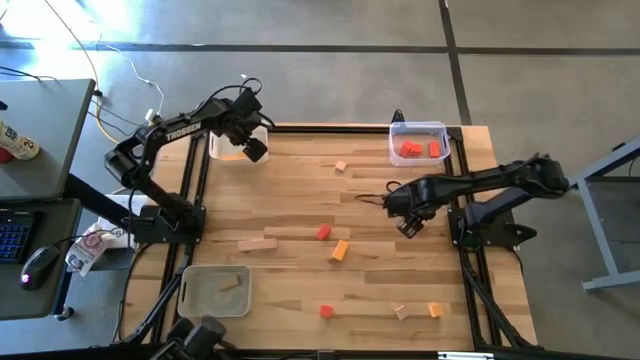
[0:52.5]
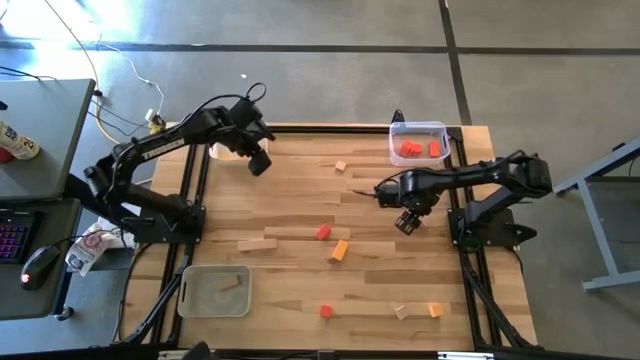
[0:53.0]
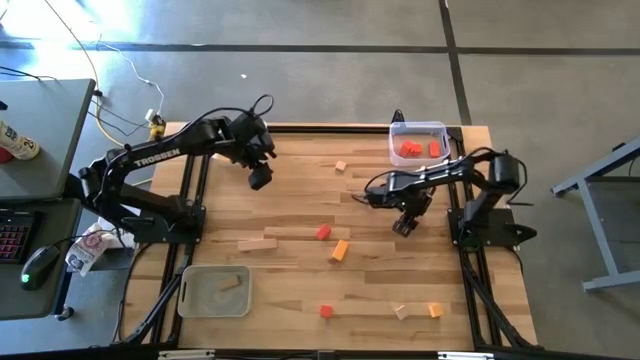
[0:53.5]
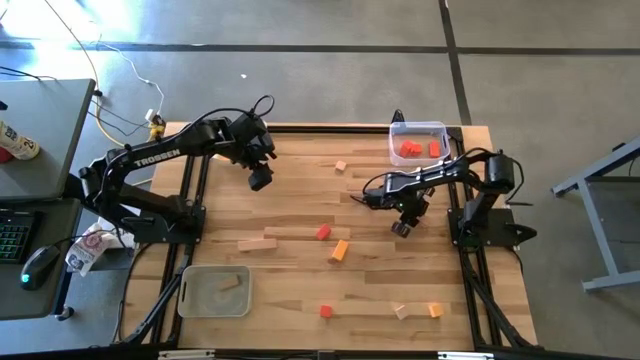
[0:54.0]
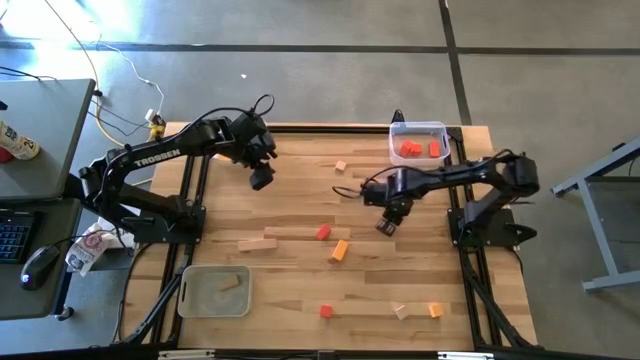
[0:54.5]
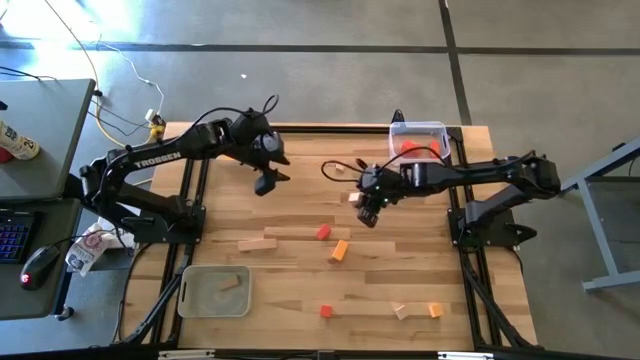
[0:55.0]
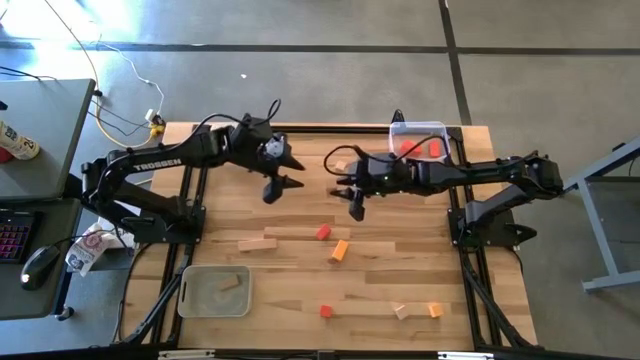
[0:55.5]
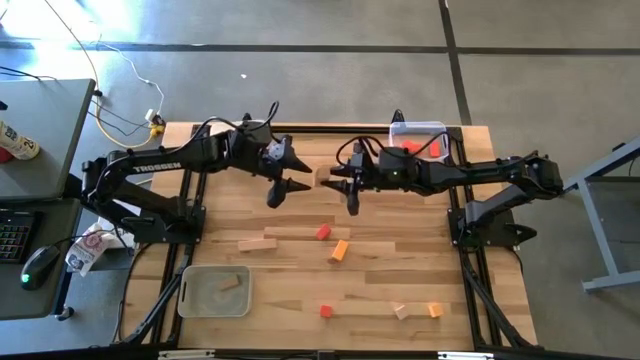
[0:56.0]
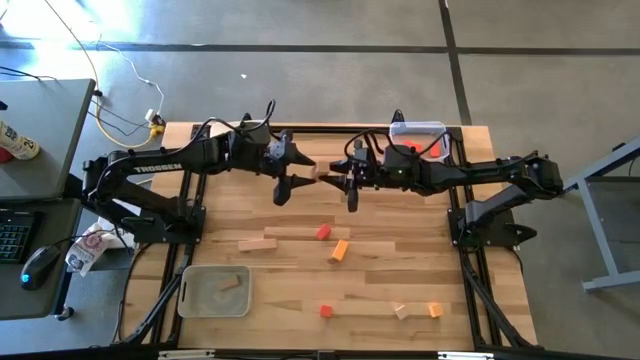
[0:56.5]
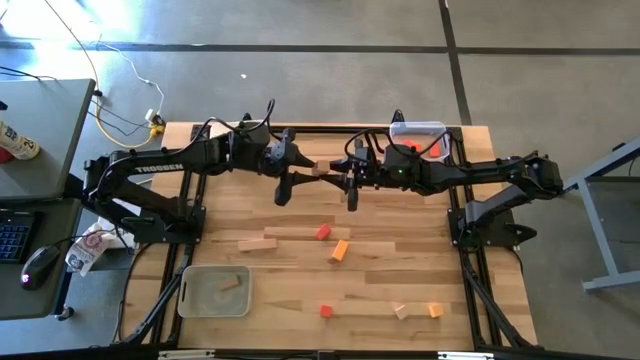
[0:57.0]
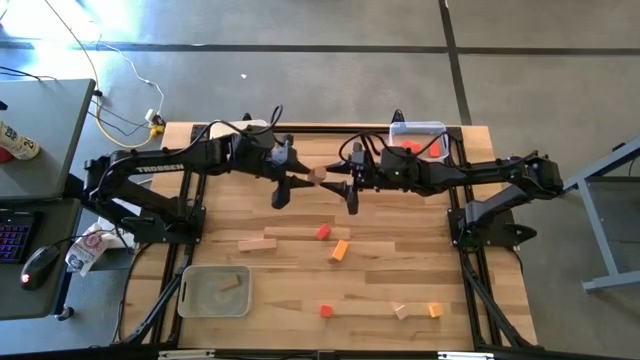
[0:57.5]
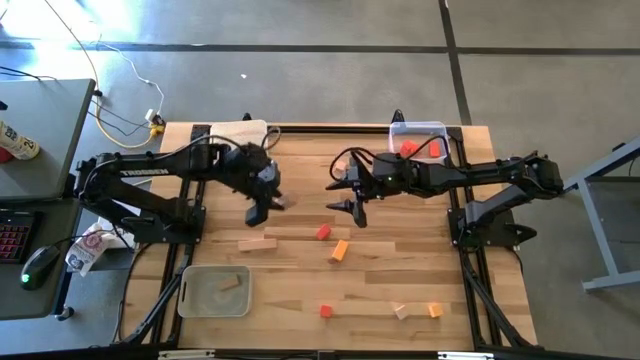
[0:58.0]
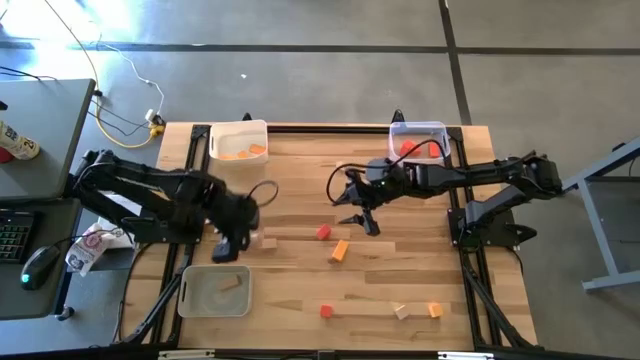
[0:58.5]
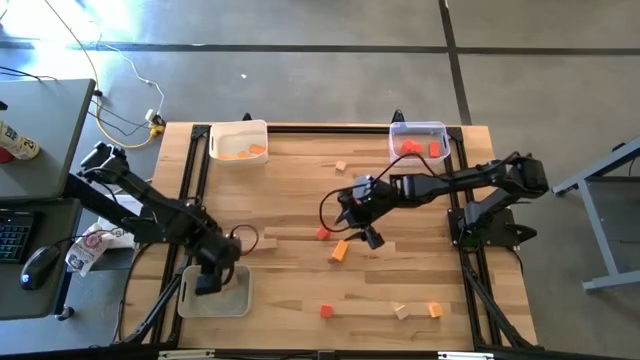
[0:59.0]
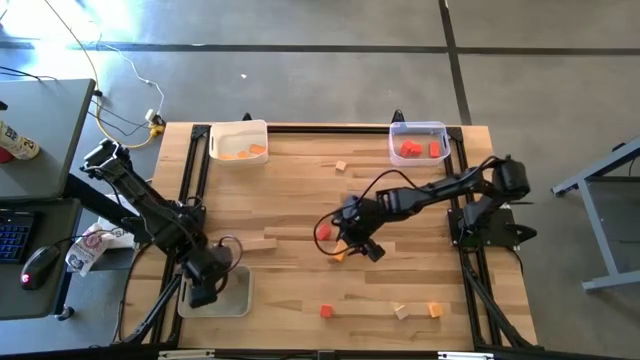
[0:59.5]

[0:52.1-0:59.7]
Task: Sort & place blocks by color
Put the brown block into the gray bin

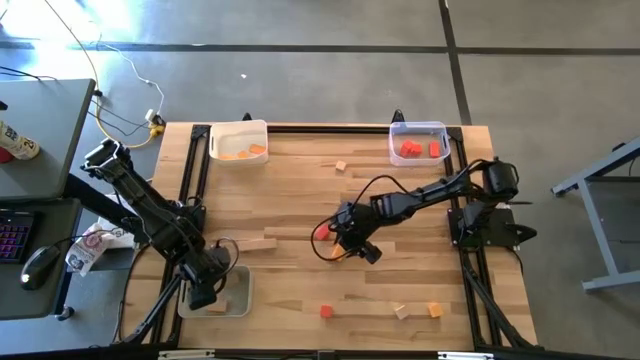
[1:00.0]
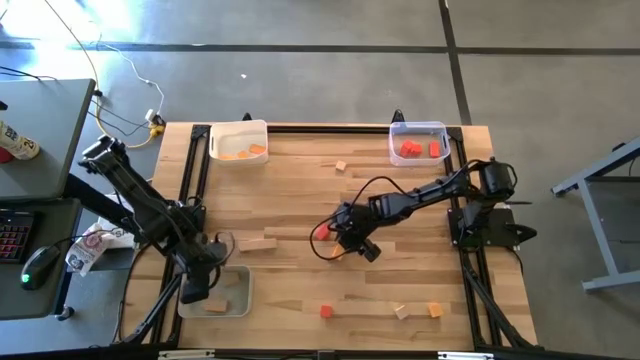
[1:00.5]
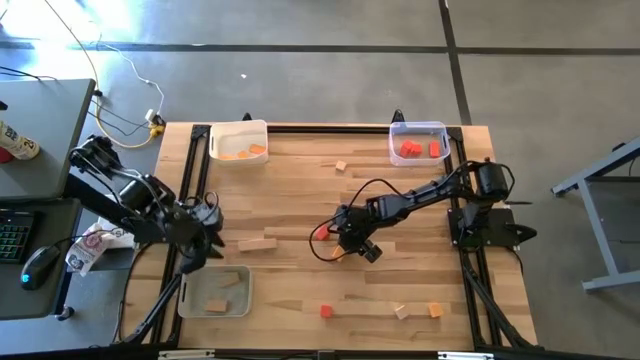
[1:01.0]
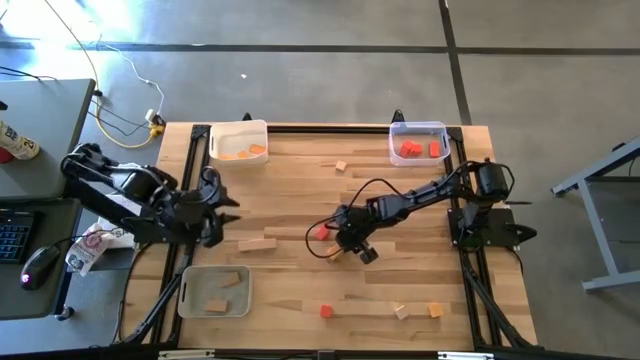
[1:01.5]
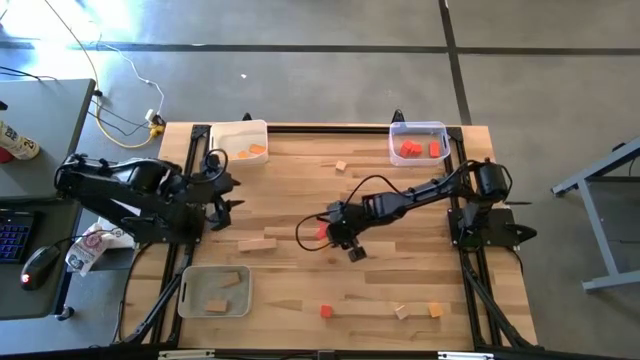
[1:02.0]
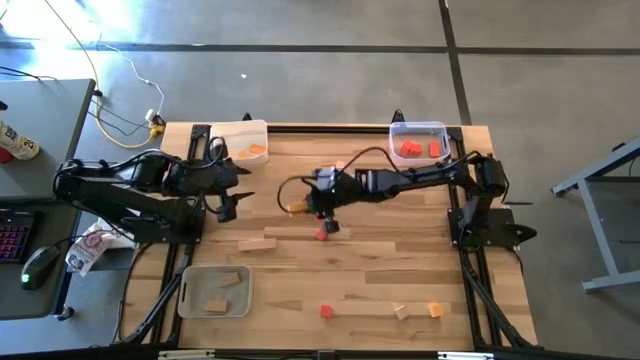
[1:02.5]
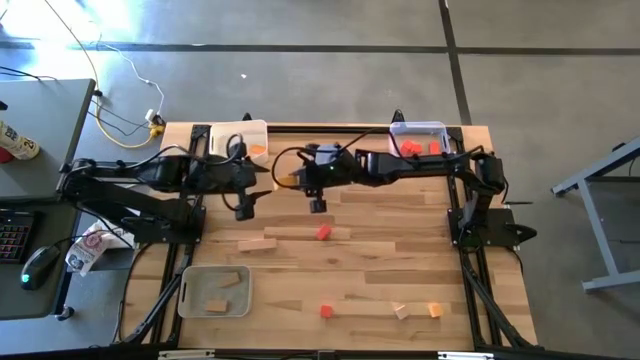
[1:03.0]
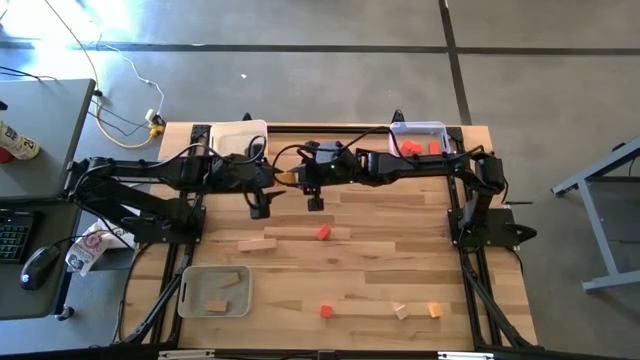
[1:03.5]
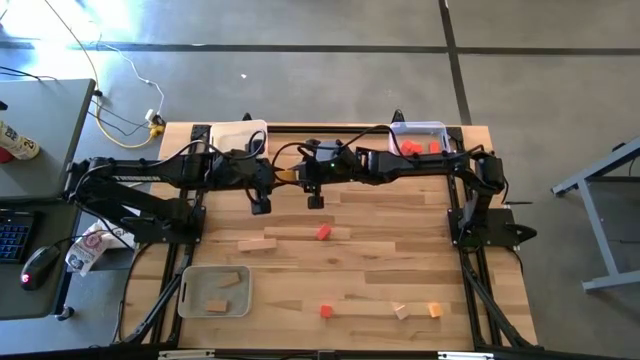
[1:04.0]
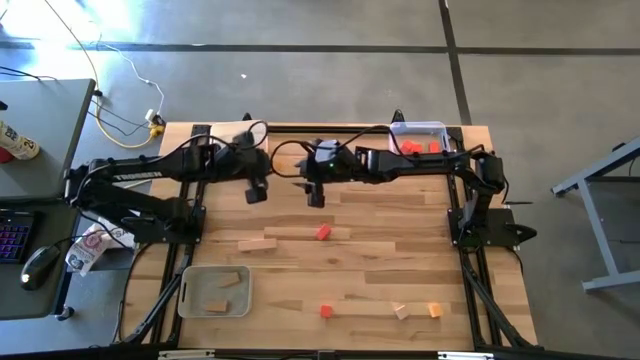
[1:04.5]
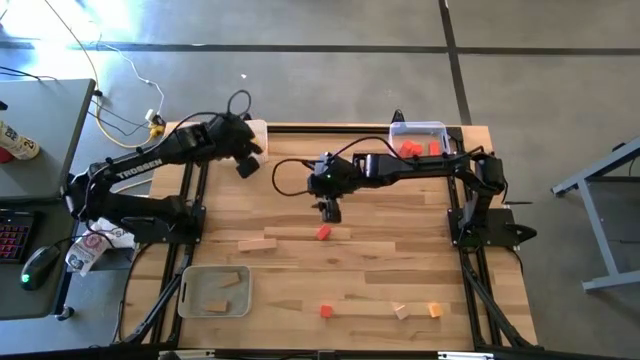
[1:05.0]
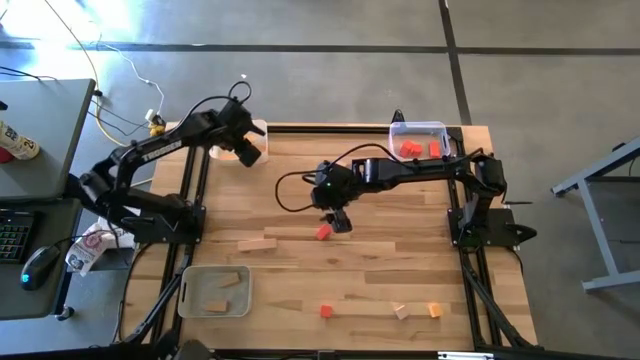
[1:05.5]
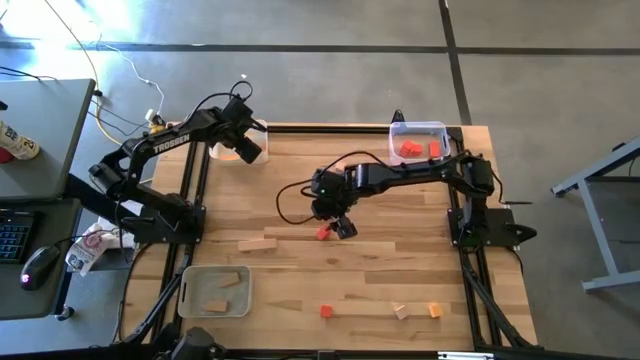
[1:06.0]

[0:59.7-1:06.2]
Put the yellow block into the white bin

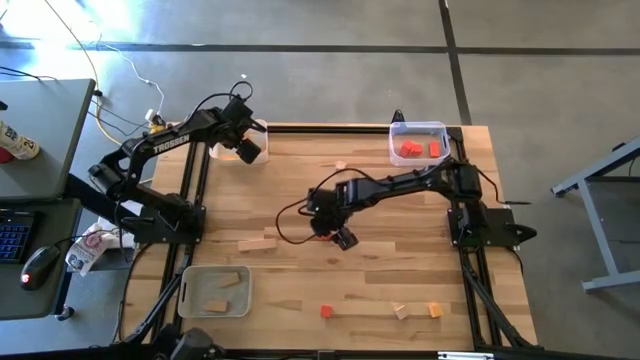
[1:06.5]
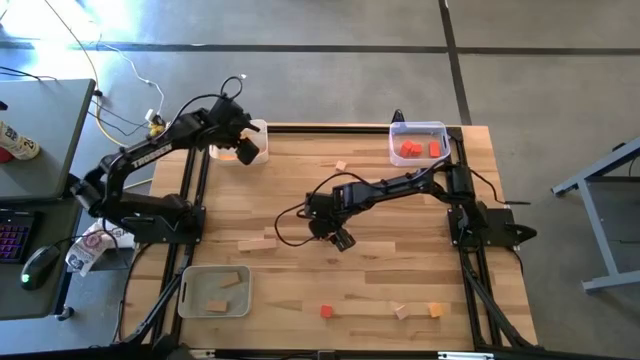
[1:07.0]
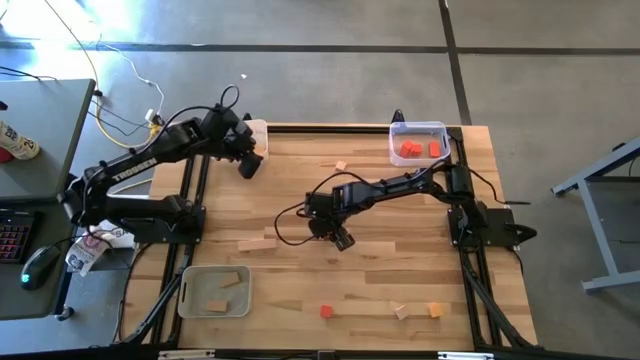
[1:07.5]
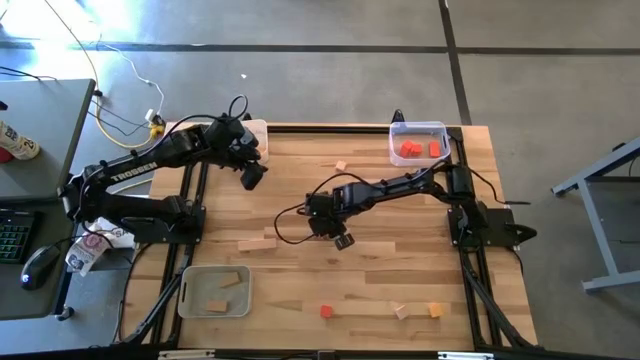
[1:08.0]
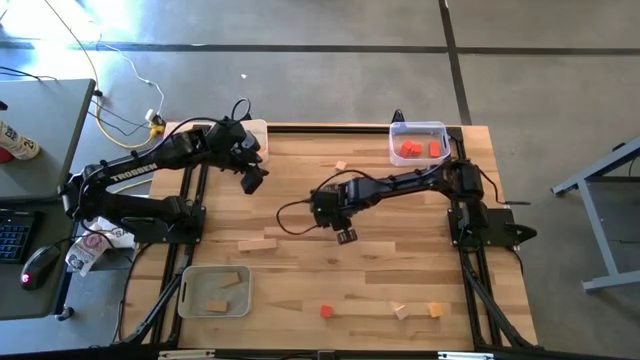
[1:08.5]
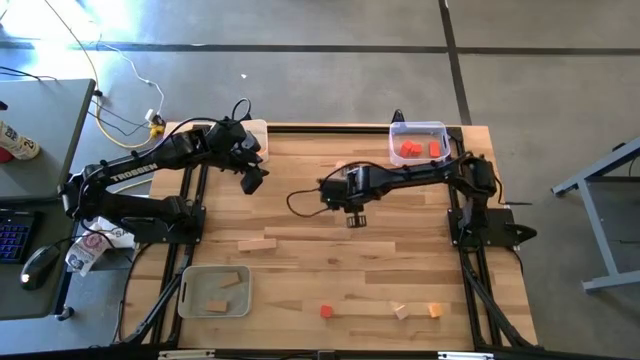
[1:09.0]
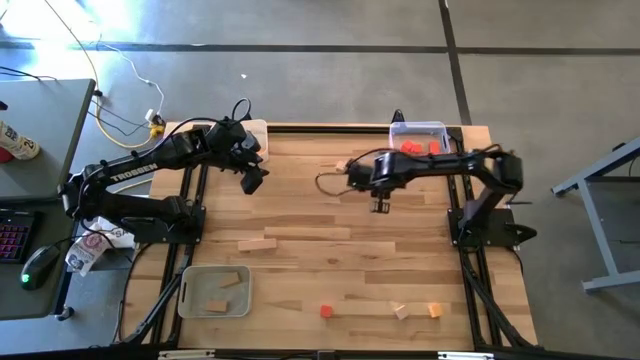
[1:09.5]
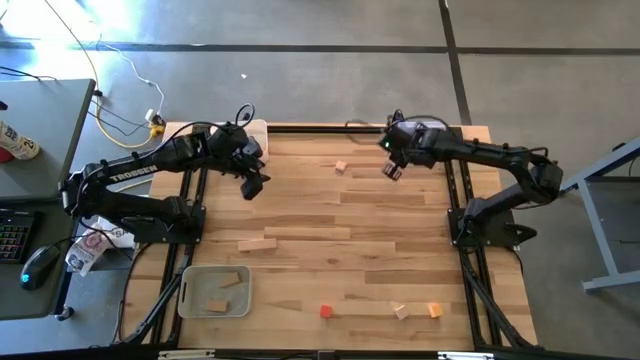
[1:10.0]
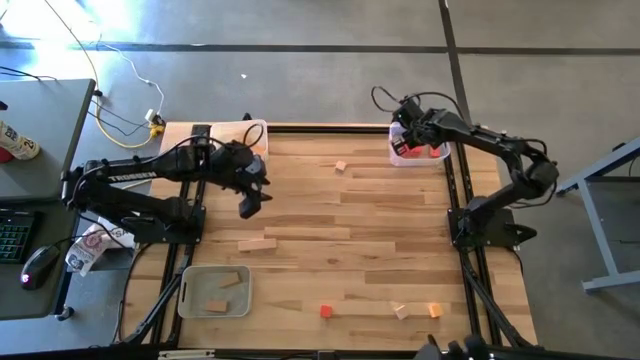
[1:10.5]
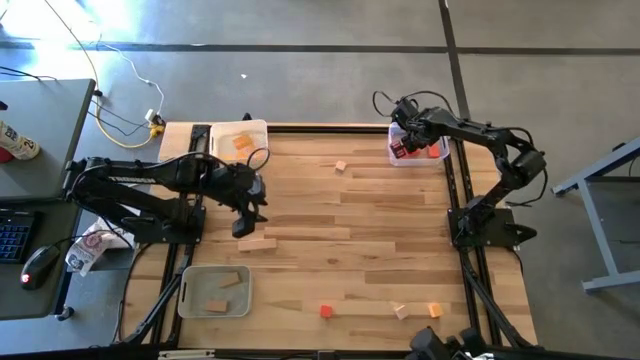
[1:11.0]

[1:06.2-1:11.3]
Put the orange block into the transparent bin

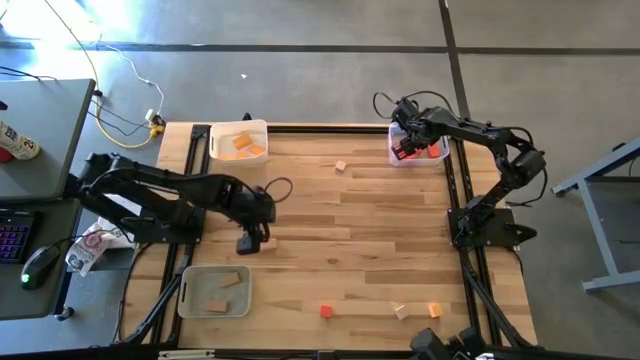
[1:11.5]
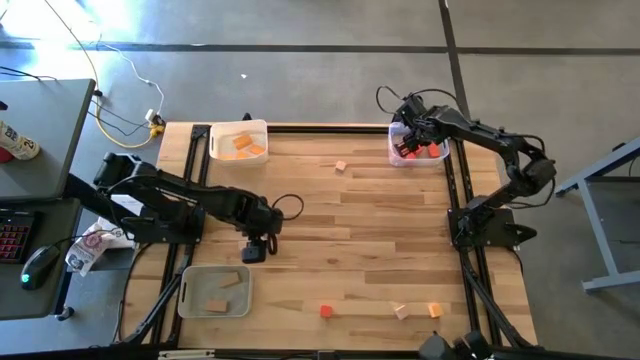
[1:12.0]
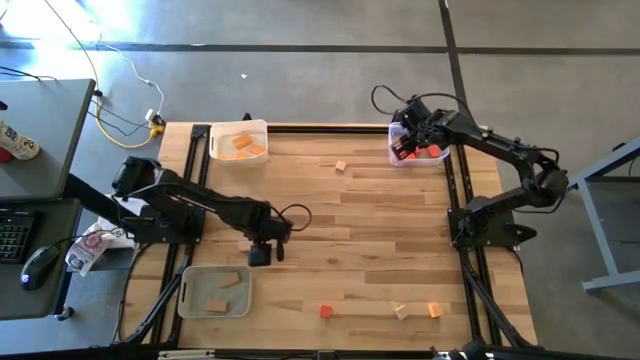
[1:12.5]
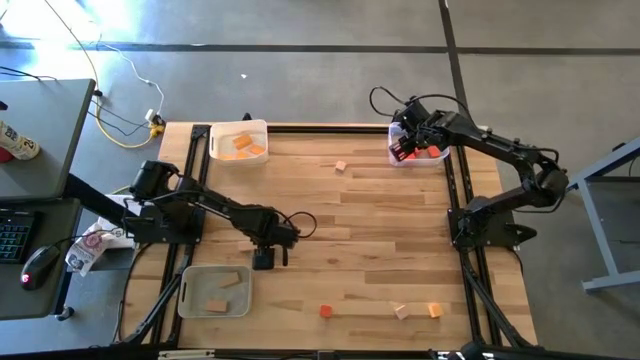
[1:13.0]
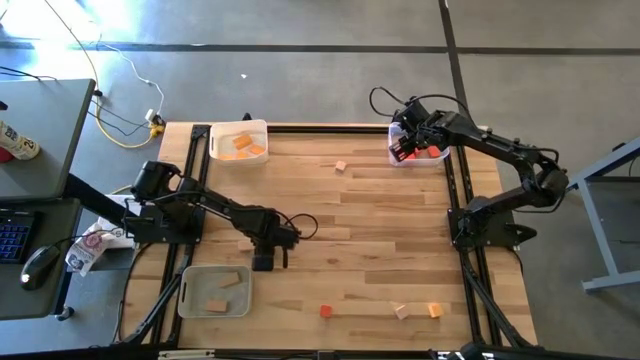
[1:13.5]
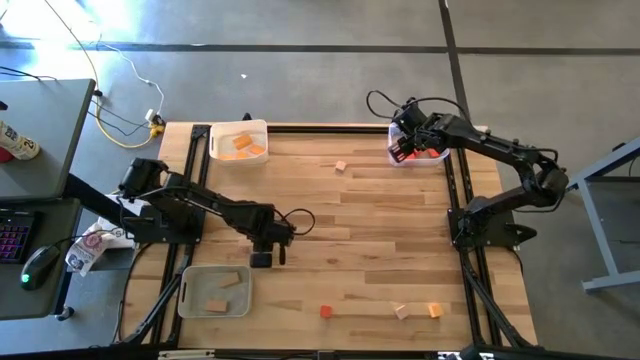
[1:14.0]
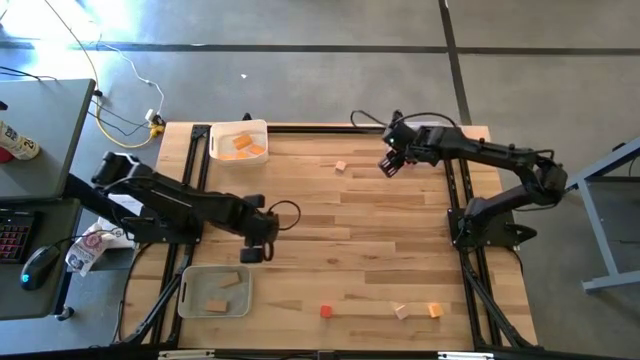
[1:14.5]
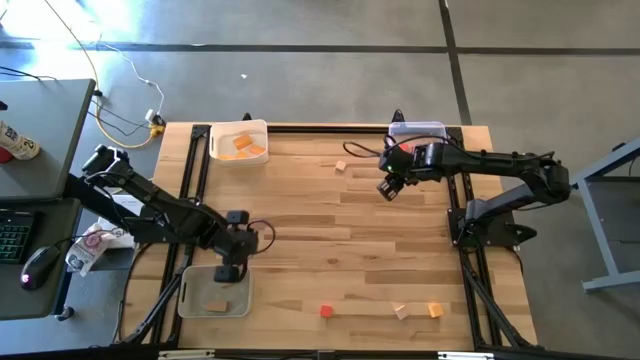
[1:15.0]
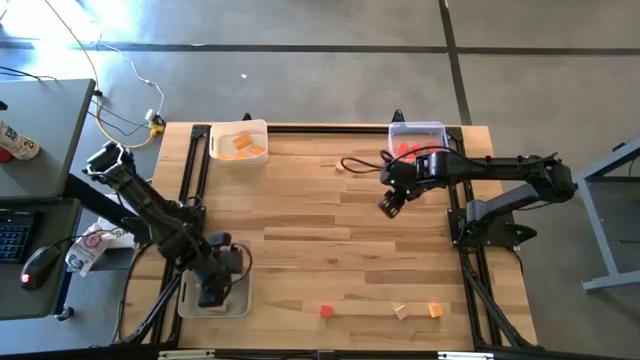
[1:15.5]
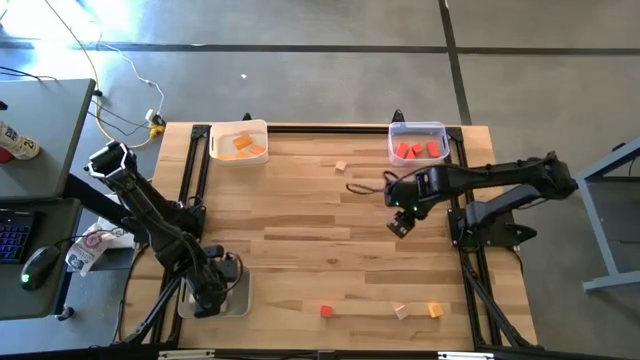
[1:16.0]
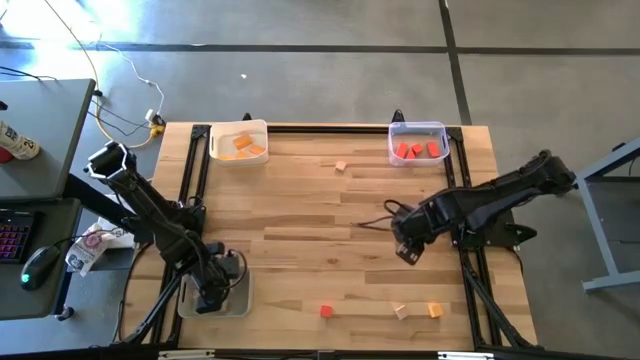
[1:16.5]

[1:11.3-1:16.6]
Put the brown block into the gray bin
